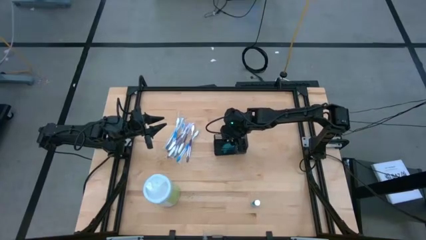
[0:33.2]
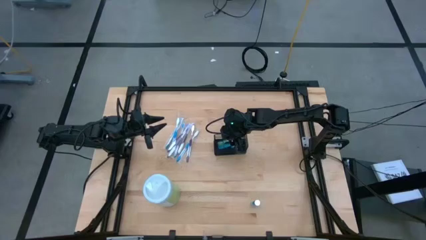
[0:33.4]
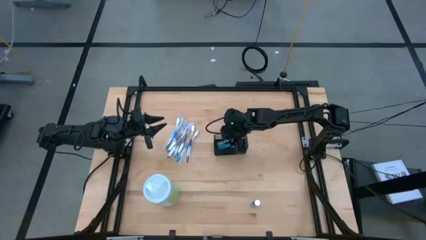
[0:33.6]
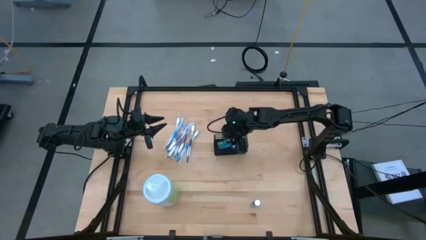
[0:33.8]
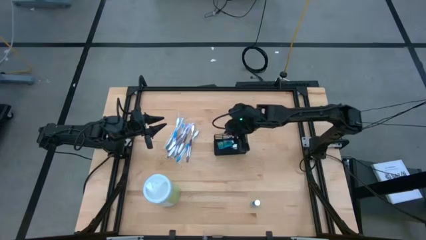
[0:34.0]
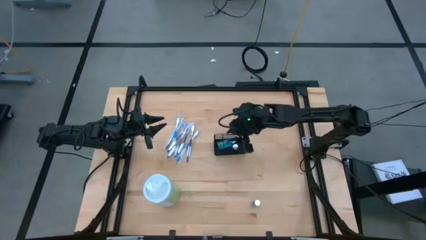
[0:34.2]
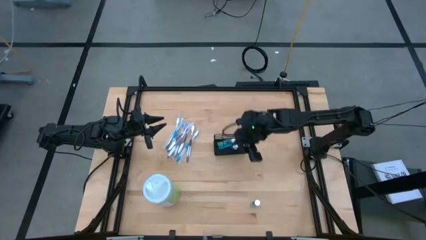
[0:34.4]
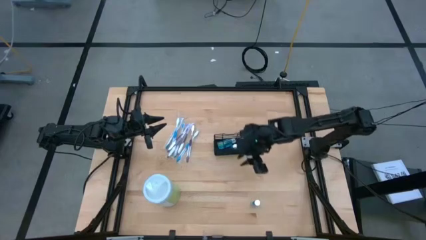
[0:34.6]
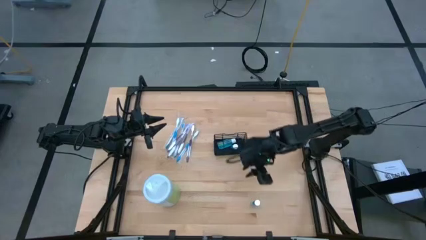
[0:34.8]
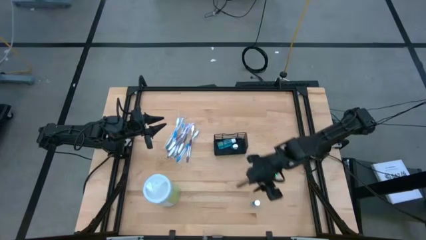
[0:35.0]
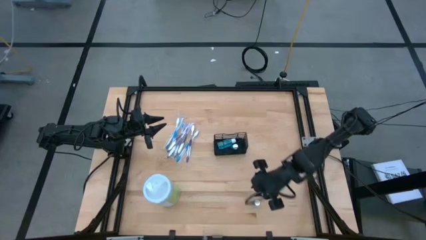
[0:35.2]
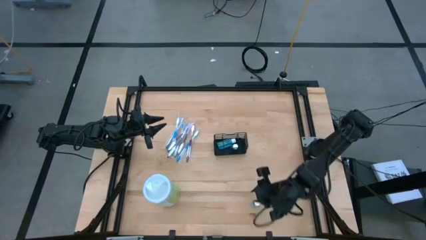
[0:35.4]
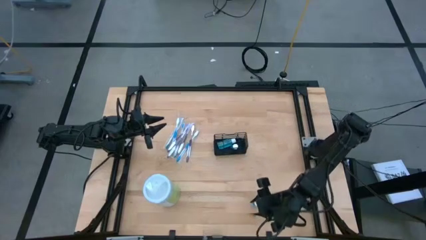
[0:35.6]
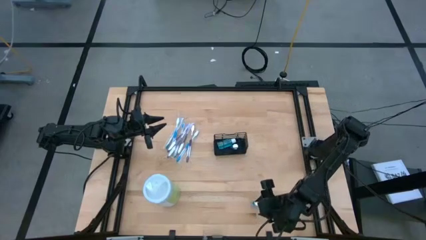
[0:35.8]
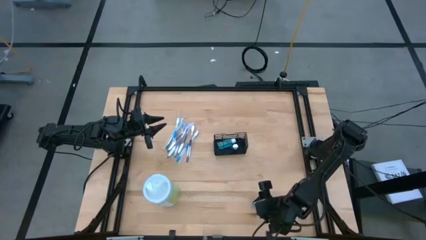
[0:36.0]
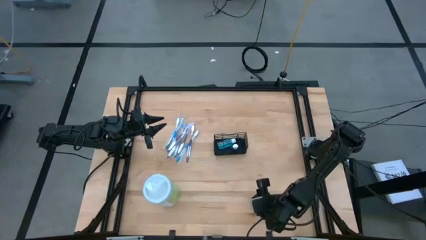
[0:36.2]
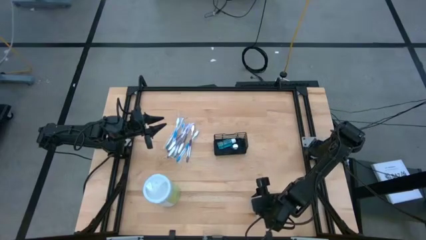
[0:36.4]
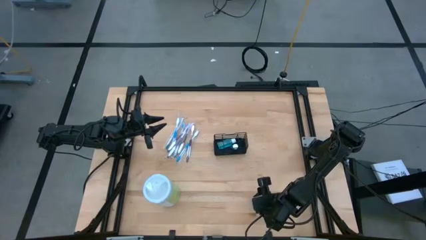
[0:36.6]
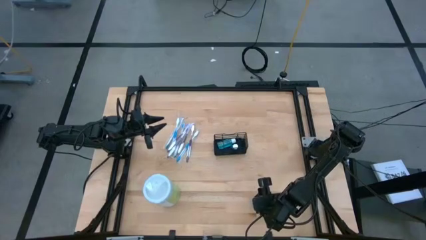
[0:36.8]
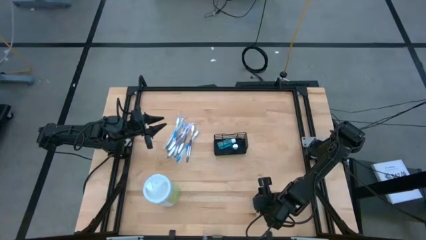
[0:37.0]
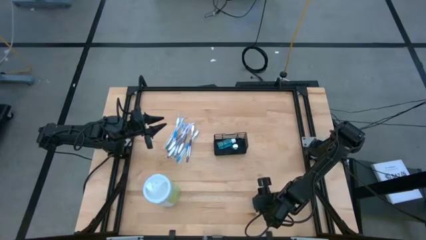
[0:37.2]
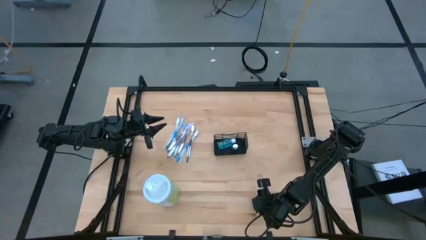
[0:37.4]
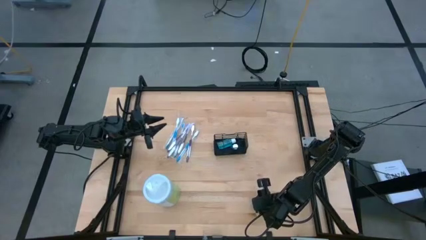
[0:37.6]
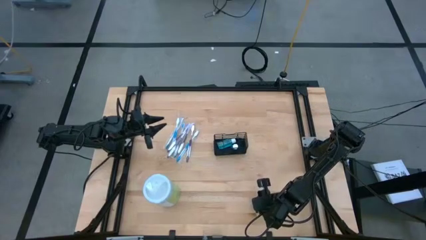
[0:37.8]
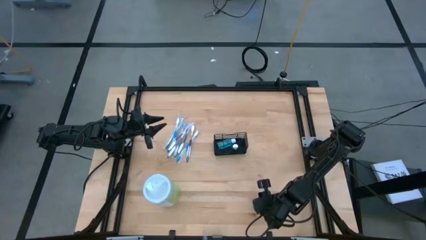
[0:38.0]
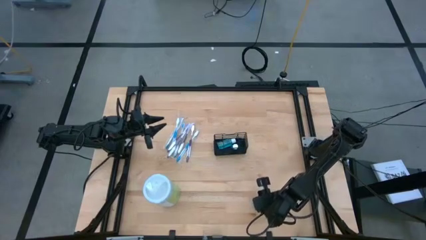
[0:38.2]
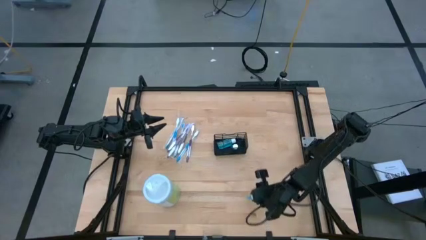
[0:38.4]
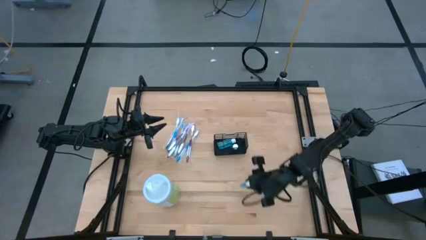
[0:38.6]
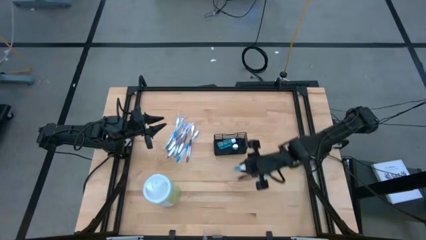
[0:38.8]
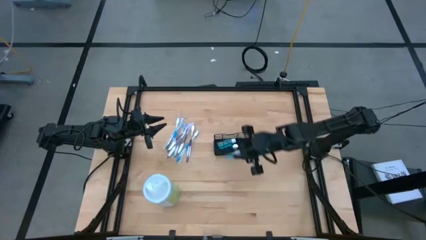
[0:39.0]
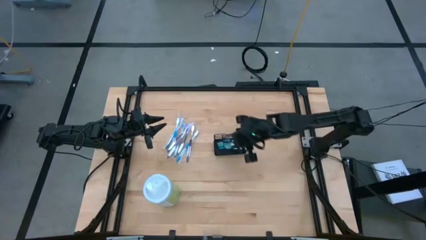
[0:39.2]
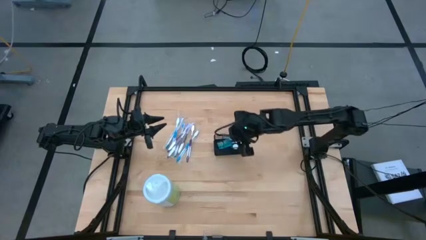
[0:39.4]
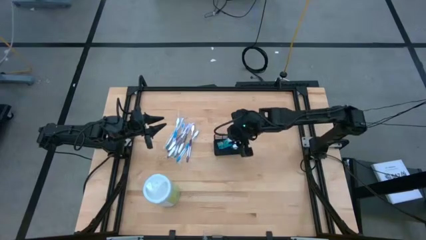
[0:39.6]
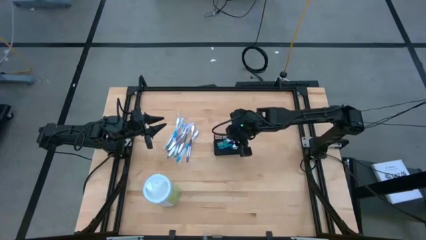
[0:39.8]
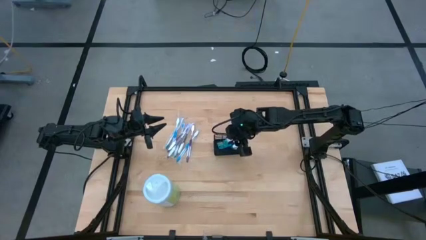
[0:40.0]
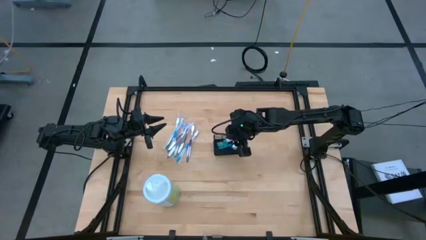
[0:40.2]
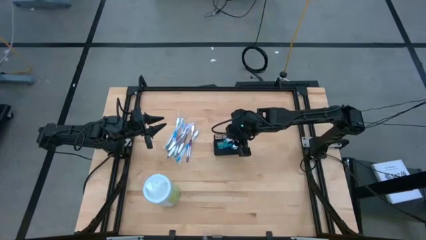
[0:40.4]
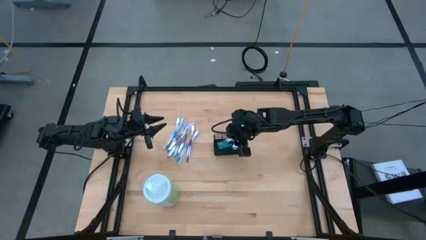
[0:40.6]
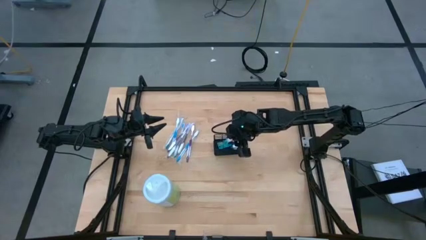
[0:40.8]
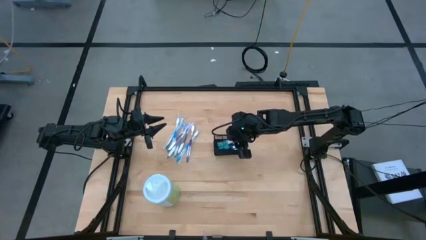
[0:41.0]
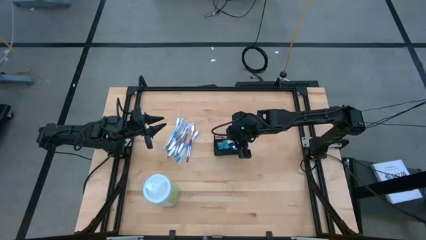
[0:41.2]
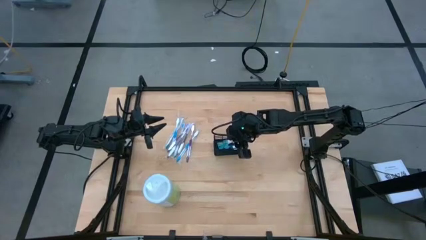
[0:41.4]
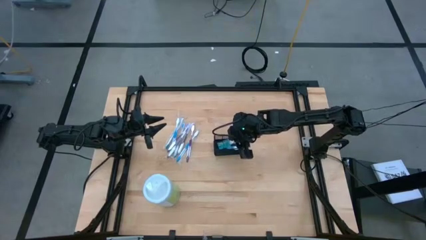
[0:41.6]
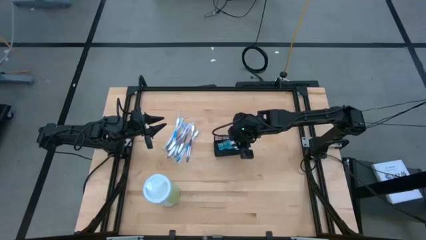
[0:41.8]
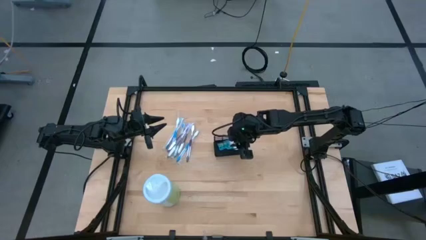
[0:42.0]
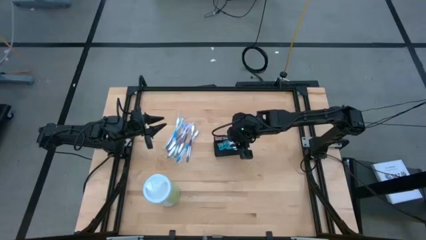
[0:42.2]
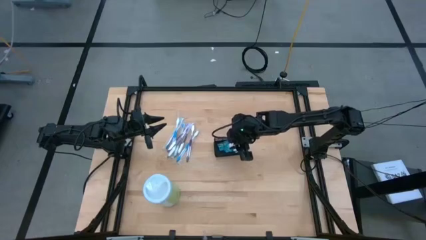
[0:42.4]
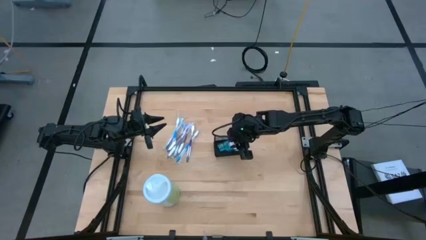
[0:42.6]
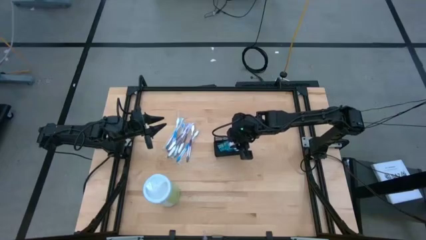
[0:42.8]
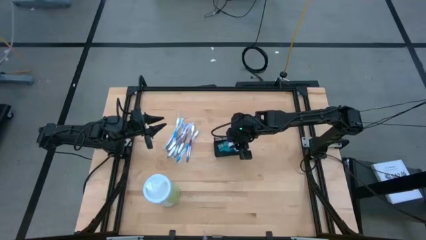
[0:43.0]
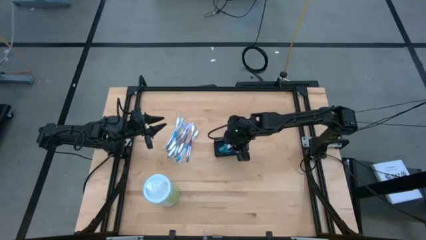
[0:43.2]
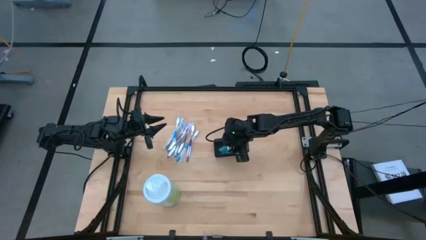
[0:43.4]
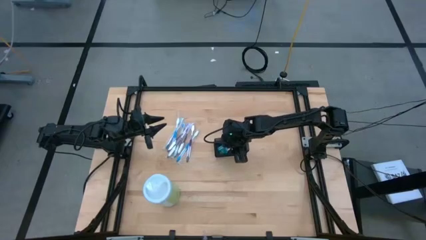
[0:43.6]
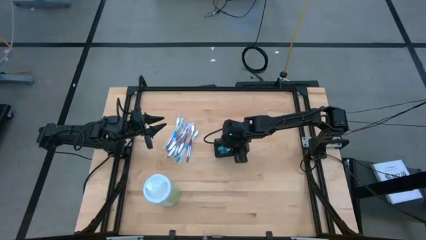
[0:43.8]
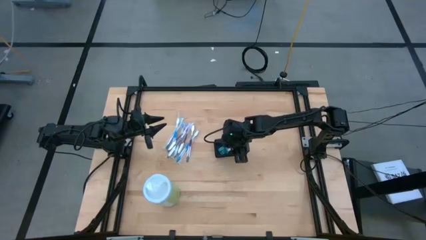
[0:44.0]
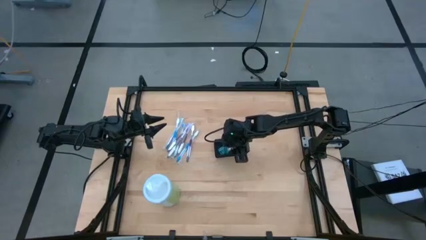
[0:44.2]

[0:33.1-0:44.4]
Task: Pick & Place toothbrushing station
Put the blue mouthwash into the black mesh organizer

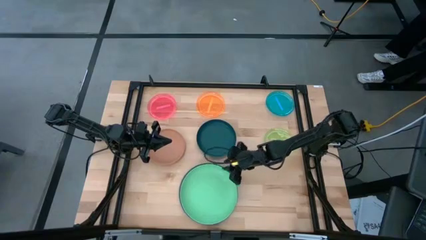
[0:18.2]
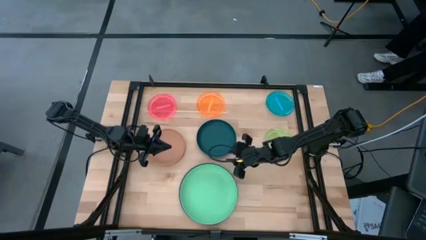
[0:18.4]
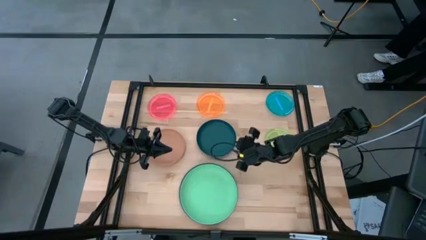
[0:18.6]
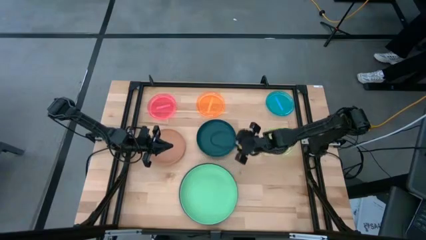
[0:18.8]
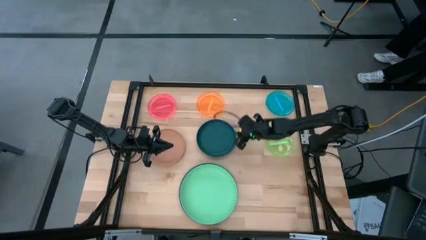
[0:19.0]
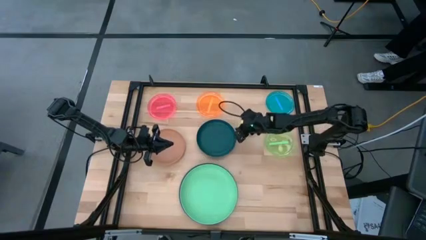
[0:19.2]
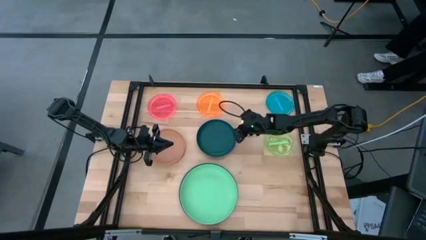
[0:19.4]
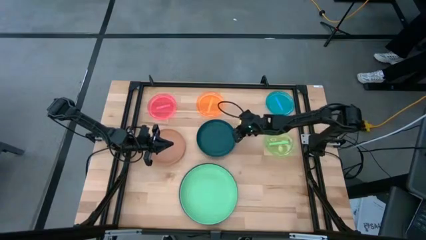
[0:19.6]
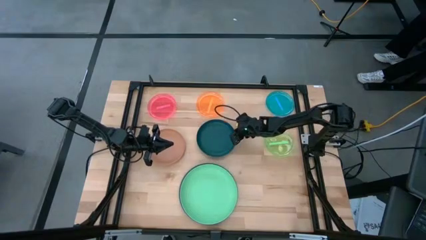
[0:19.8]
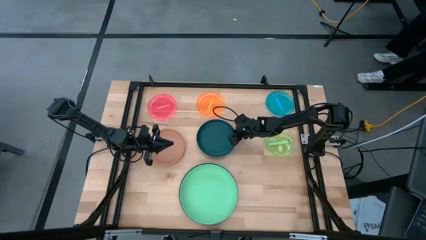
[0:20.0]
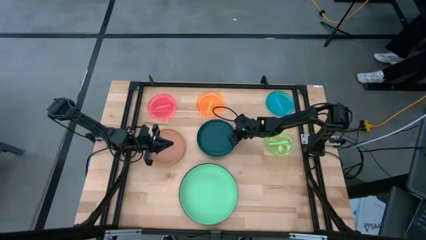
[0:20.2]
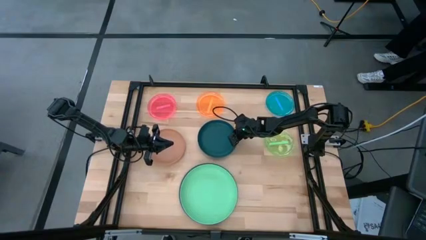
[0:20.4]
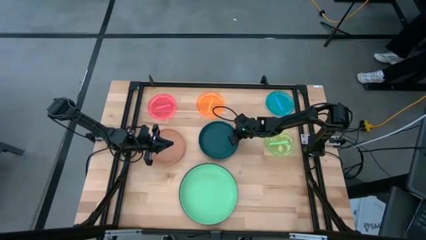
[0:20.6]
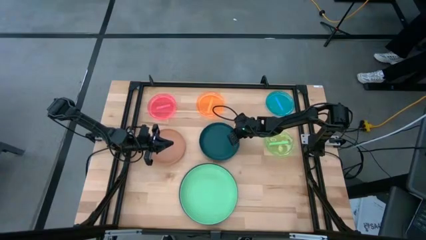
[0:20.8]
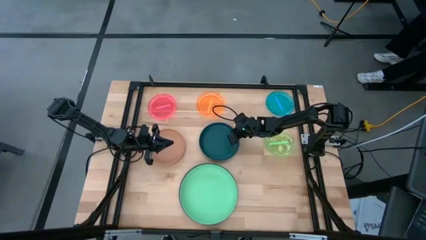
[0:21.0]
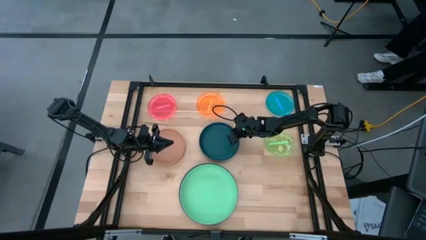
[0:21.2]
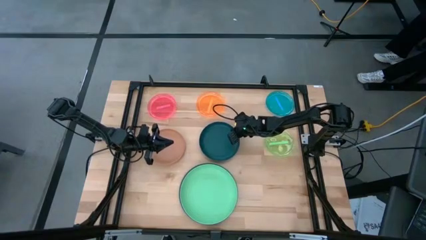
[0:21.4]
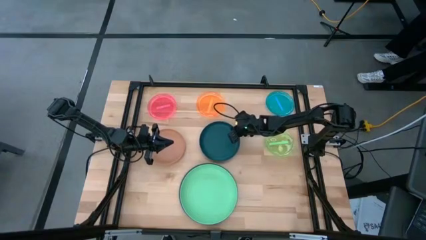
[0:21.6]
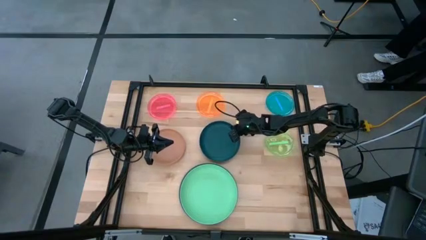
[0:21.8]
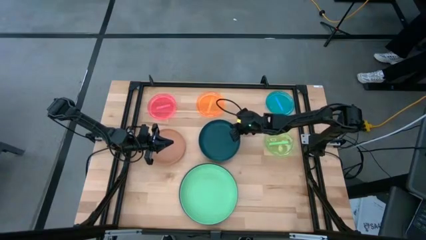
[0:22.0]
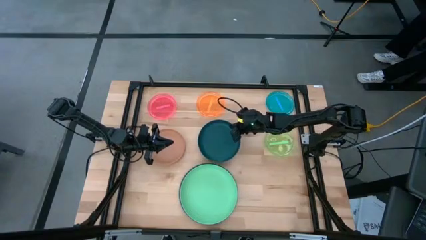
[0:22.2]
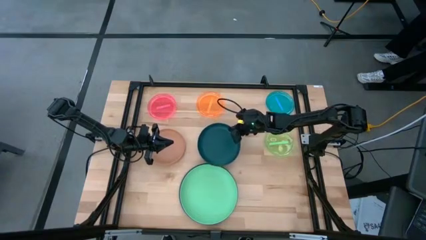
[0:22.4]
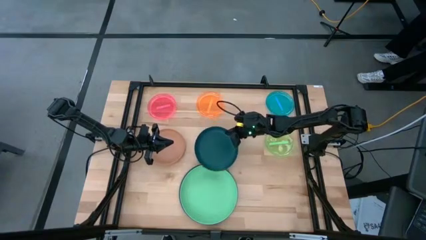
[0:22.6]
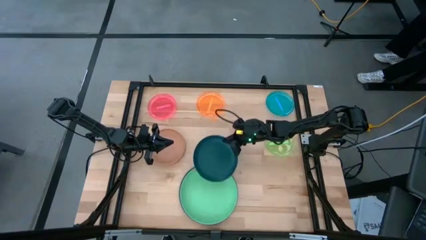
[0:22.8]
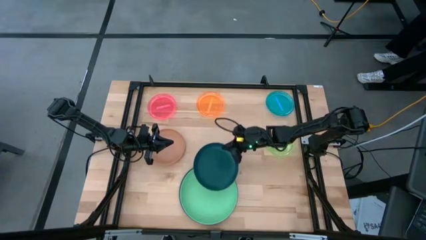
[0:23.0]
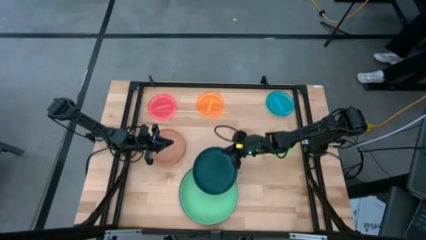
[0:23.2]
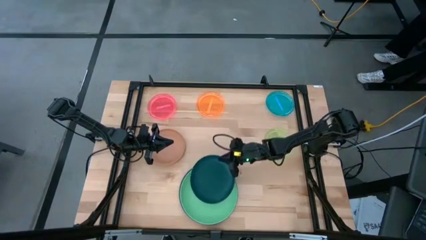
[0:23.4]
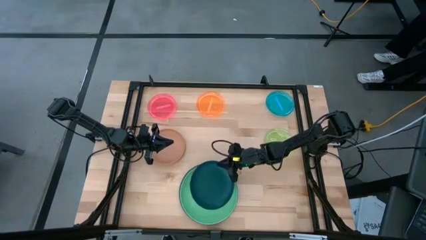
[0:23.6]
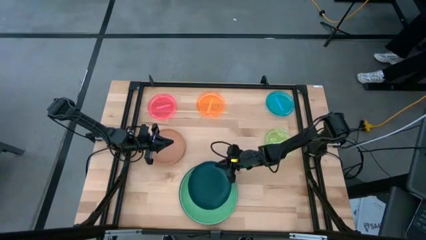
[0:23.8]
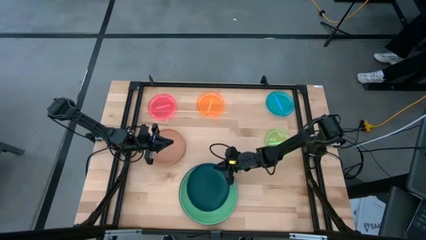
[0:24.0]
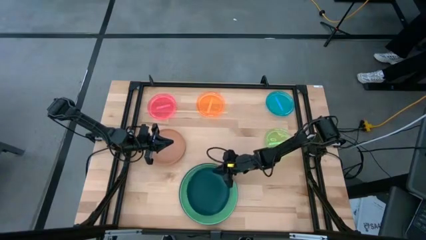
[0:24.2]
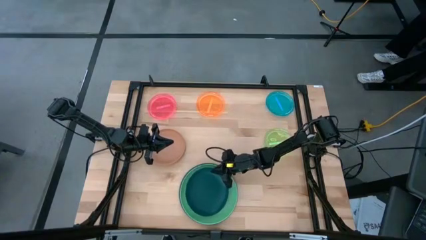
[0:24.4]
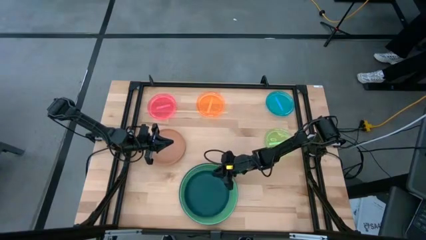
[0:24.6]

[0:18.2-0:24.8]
Task: Stack plastic plates
Stack the dark green plate on top of the light green plate
